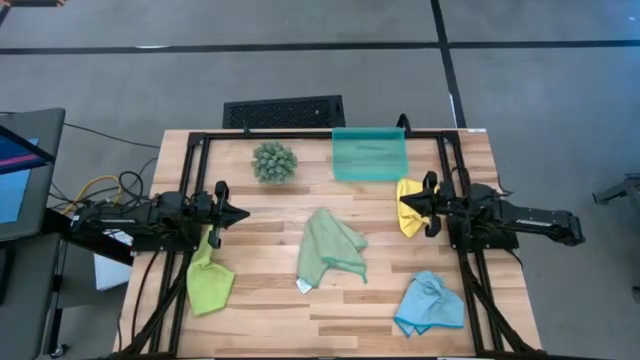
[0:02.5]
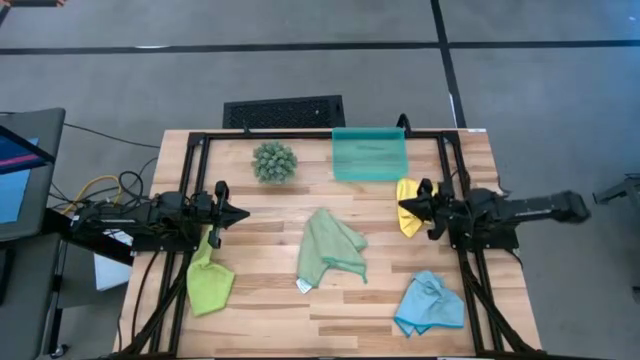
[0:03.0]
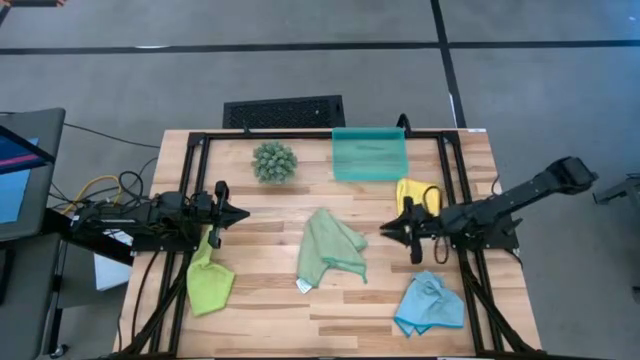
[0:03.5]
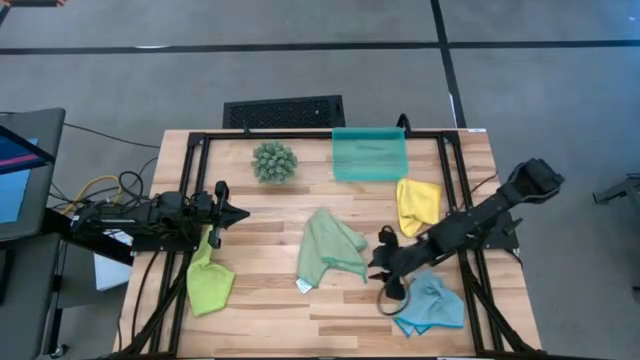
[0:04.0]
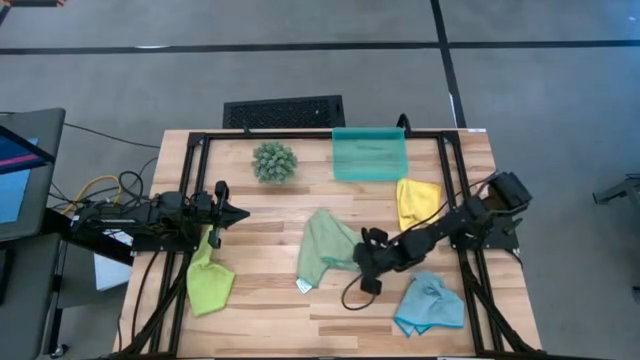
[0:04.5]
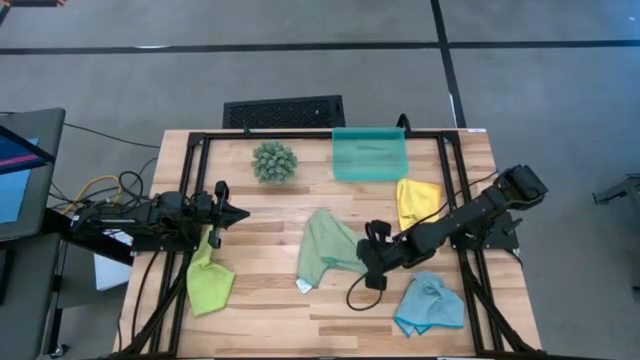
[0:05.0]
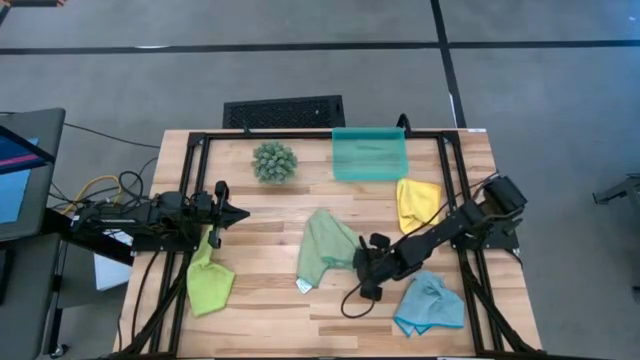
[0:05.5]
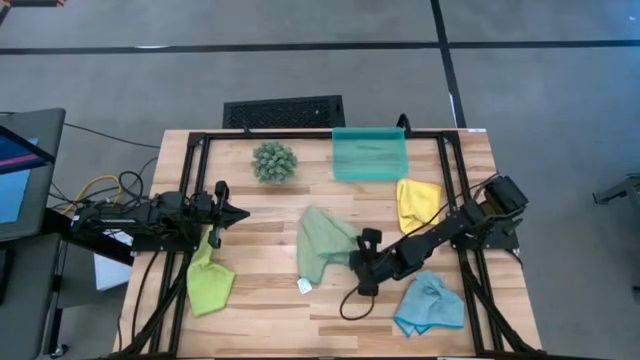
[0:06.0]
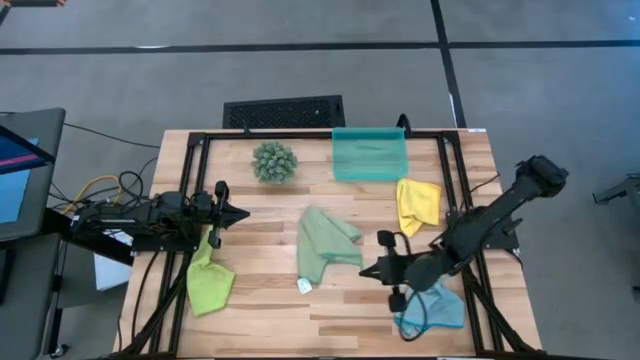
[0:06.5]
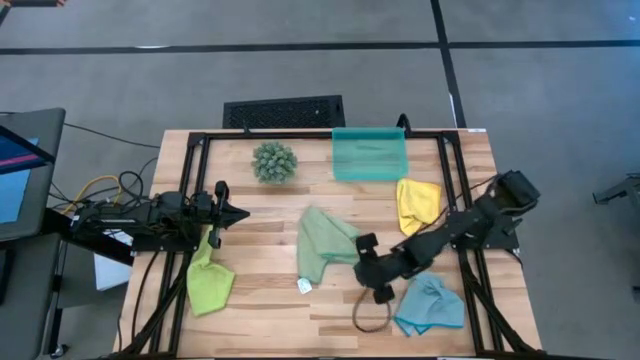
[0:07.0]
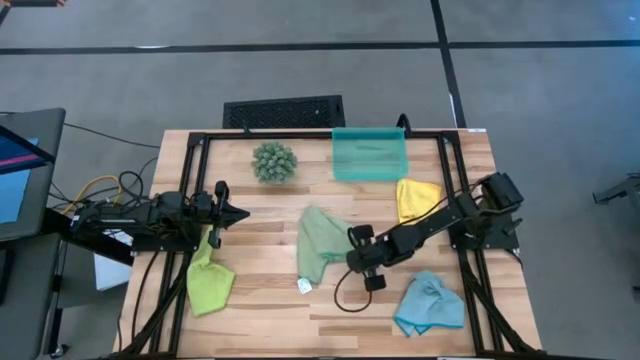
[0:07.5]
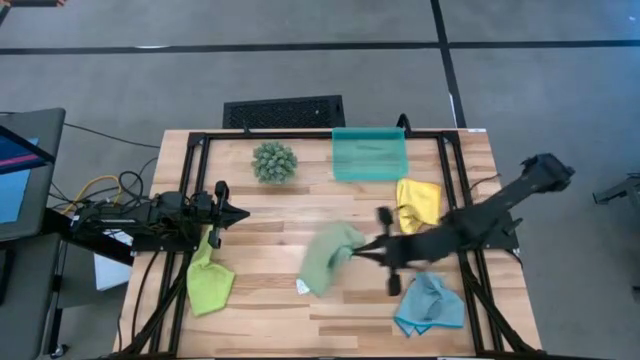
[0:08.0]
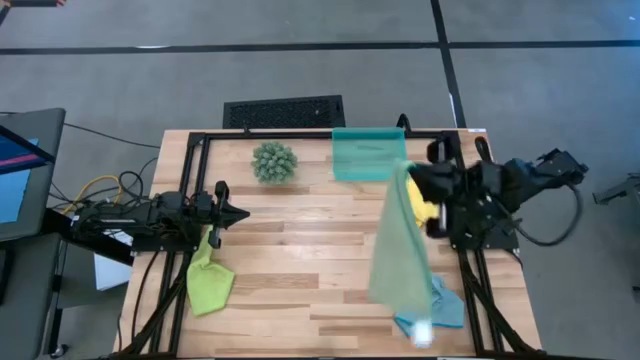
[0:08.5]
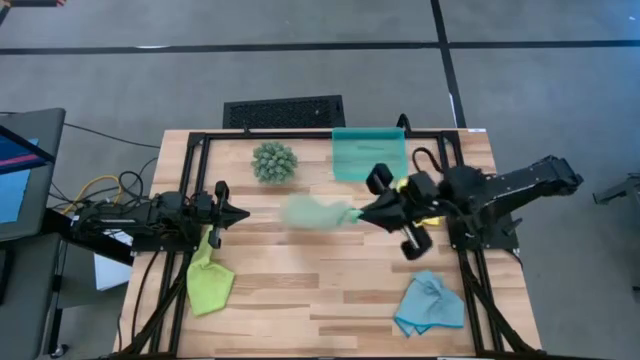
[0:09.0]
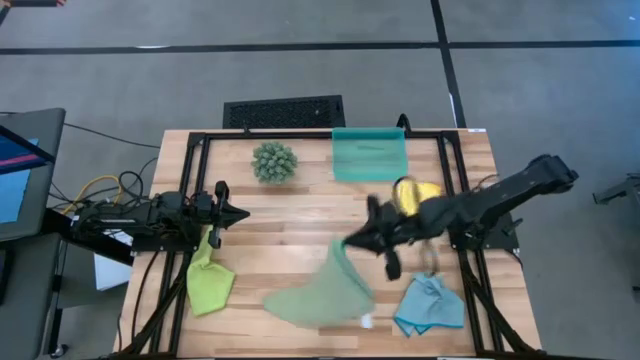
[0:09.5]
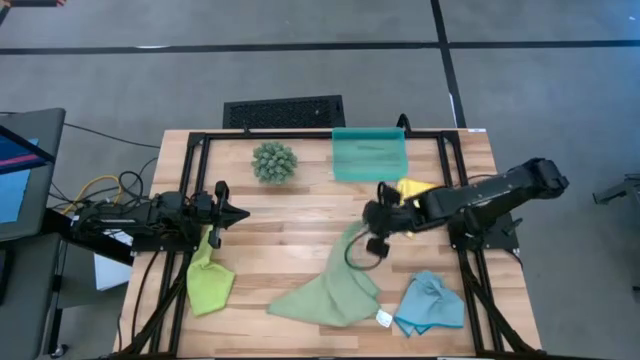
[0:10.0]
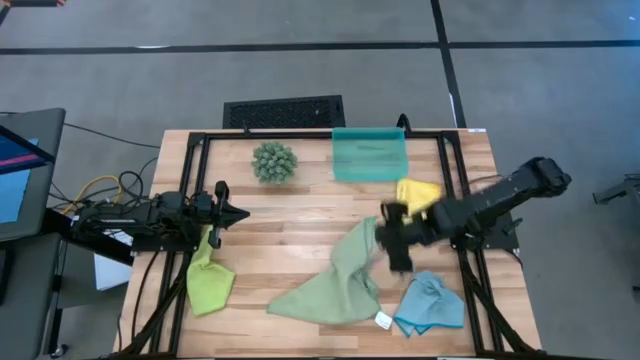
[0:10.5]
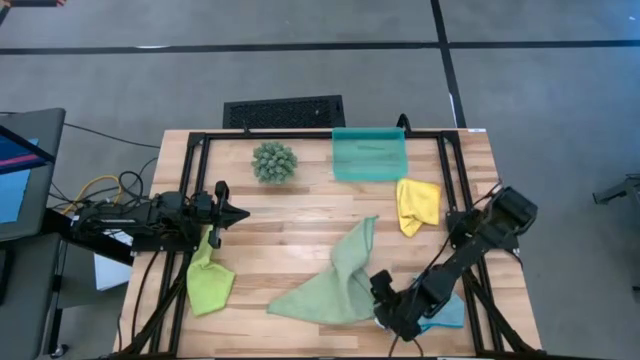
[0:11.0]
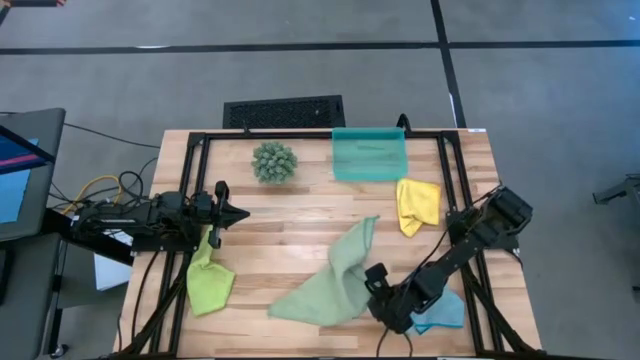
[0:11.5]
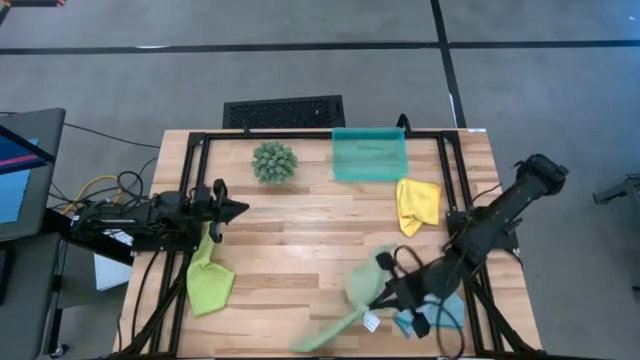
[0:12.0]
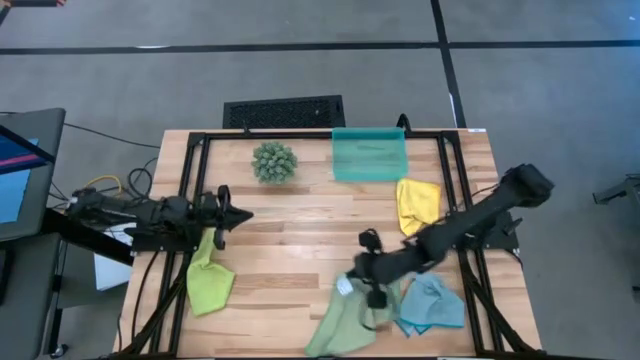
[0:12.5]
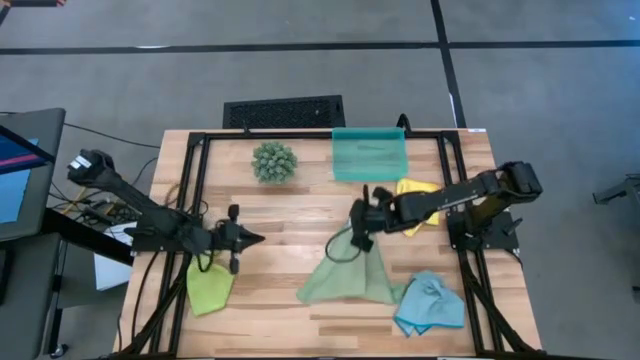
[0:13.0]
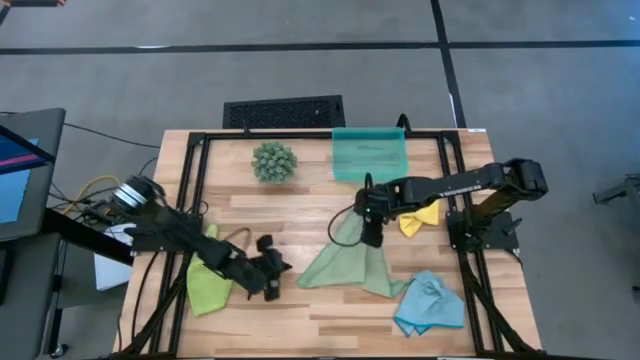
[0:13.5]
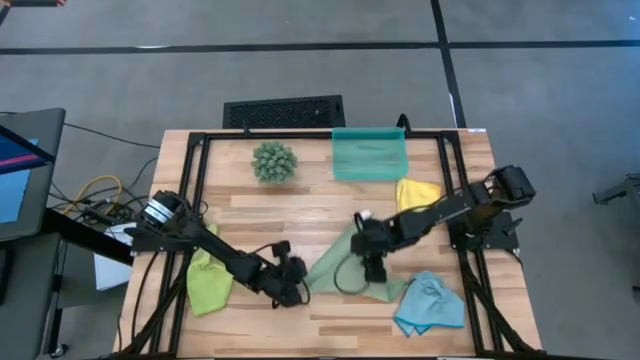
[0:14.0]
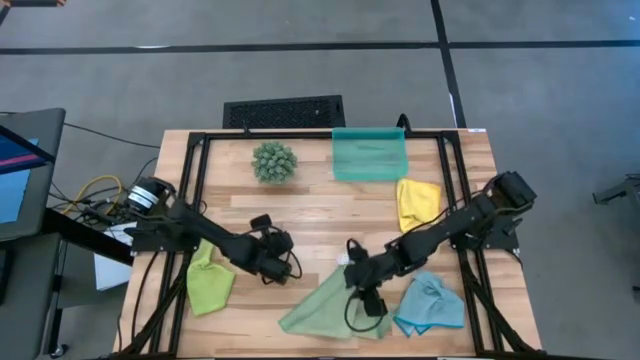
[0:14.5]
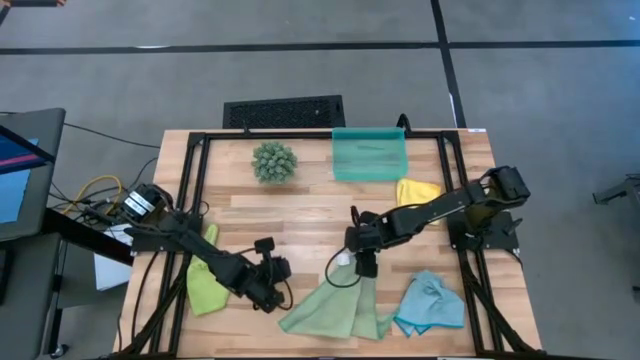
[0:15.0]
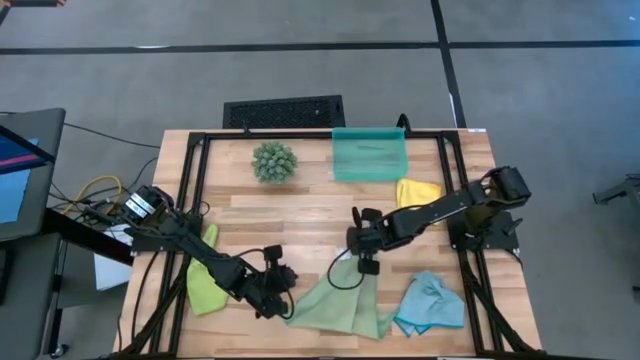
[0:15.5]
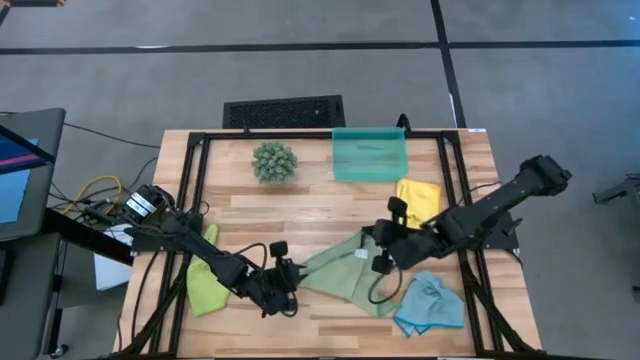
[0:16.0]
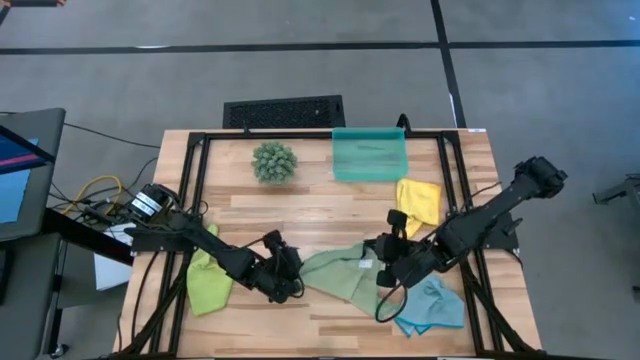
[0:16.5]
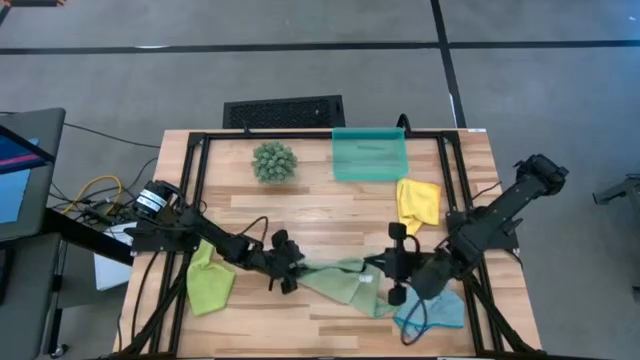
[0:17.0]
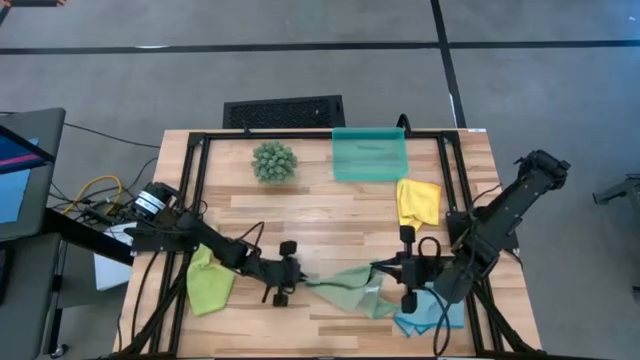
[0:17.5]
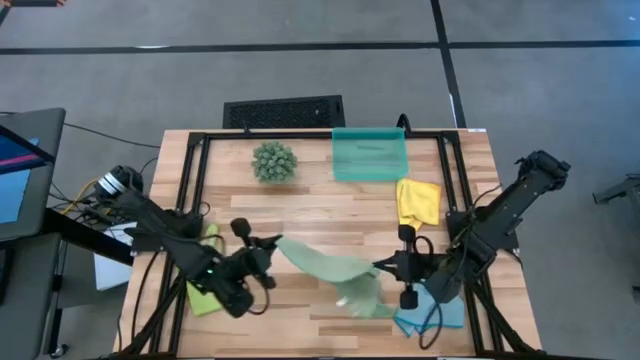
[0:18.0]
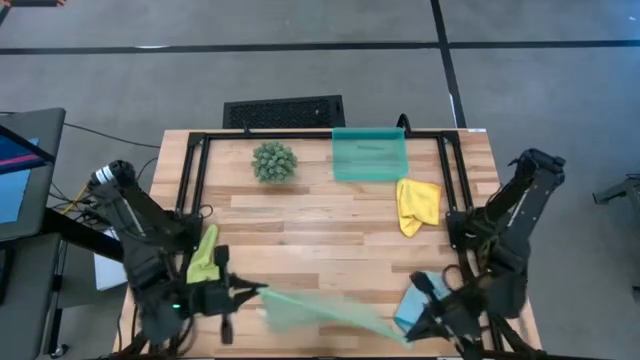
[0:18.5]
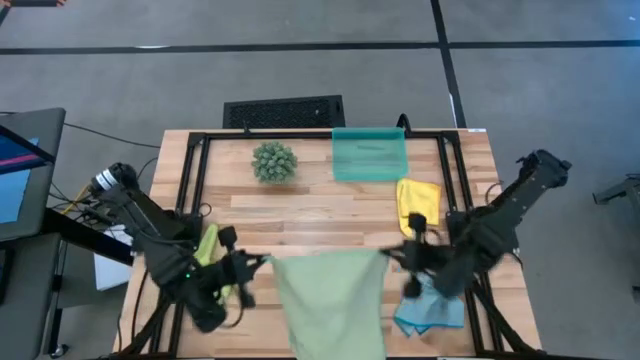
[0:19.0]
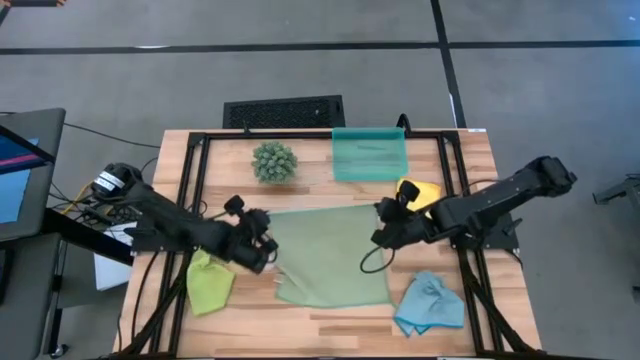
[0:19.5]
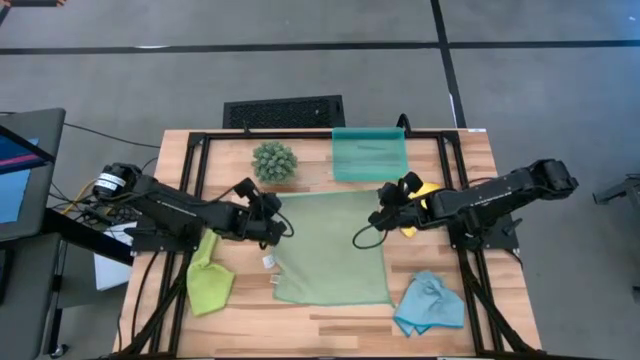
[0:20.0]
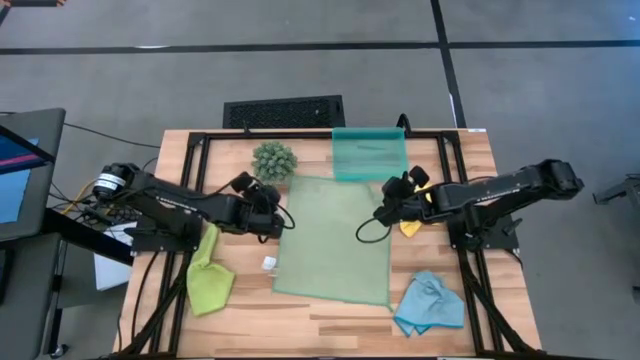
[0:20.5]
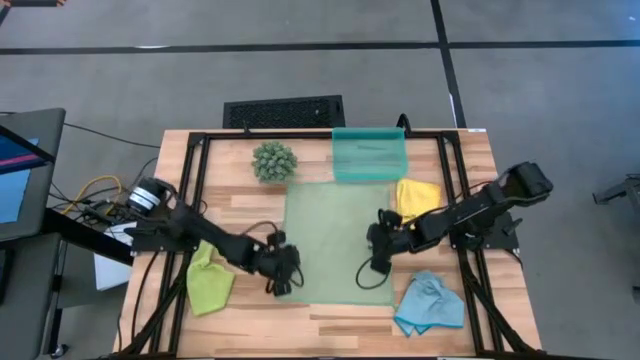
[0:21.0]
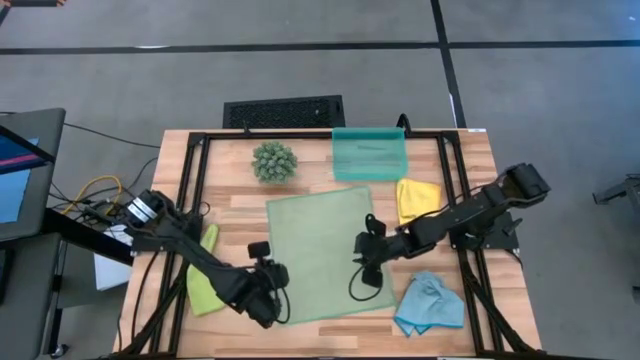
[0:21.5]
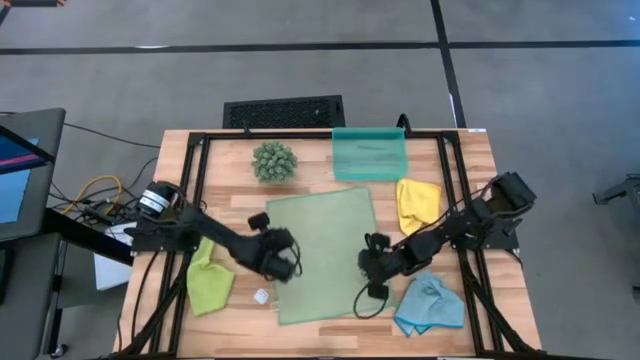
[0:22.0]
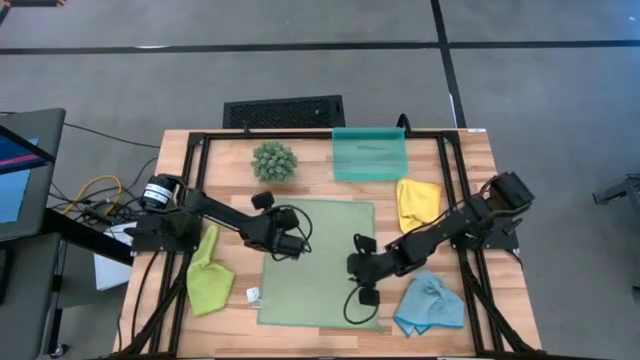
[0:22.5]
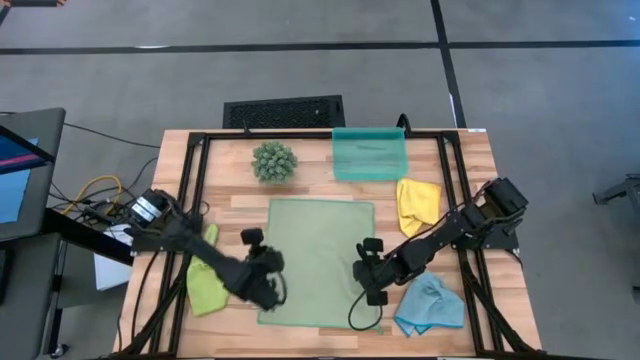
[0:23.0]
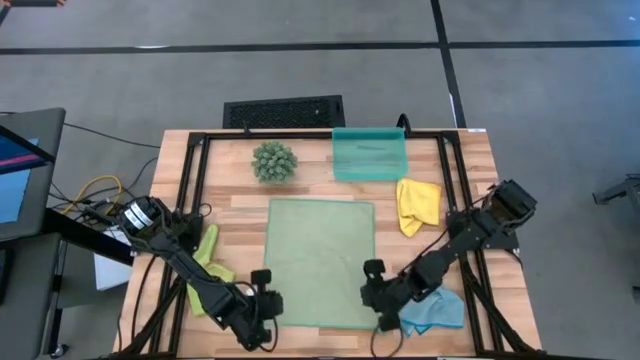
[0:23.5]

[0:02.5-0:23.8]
Task: Roll microfiber towels into tight, uniform cylinder then place into a basket
Roll the dark green microfiber cloth
